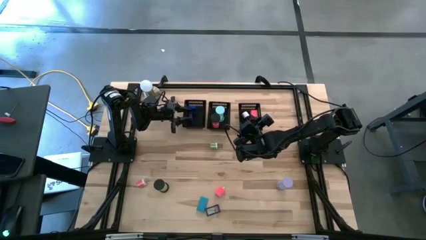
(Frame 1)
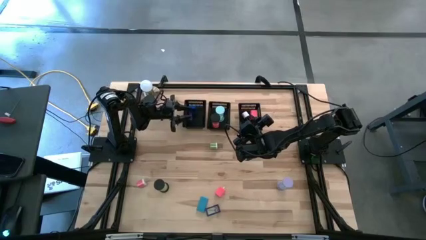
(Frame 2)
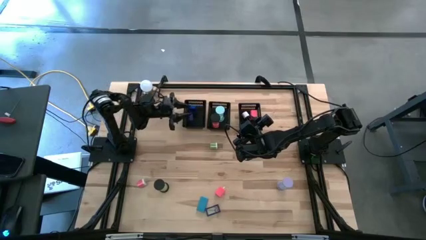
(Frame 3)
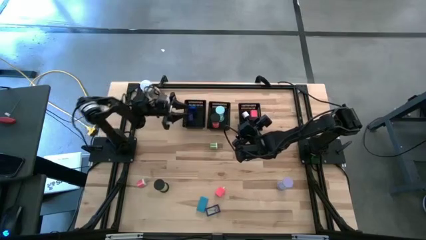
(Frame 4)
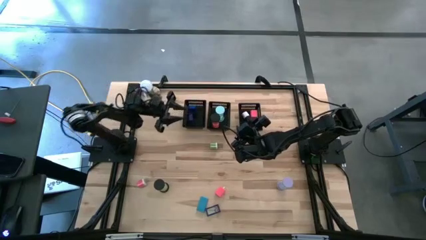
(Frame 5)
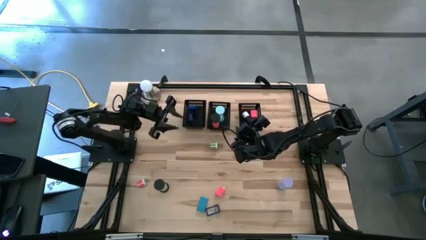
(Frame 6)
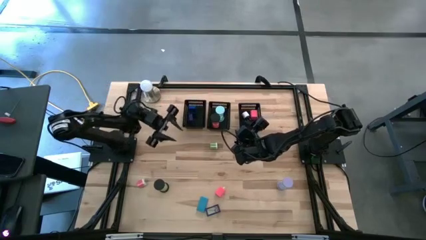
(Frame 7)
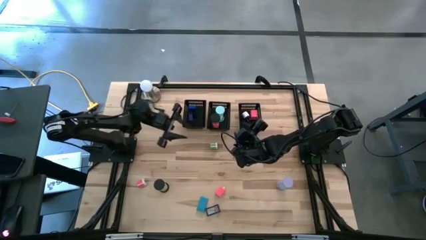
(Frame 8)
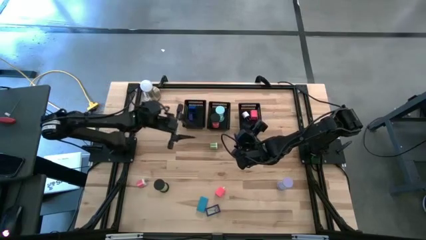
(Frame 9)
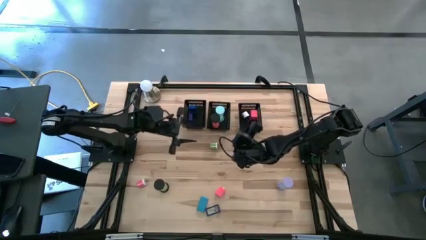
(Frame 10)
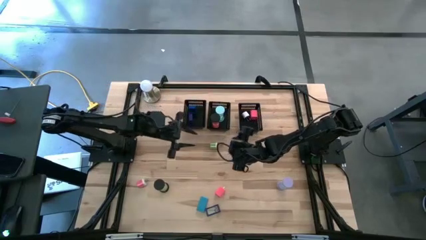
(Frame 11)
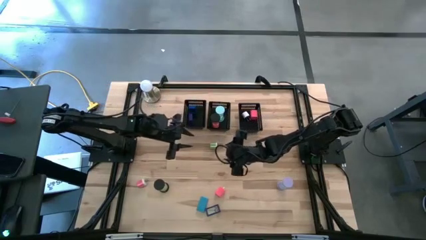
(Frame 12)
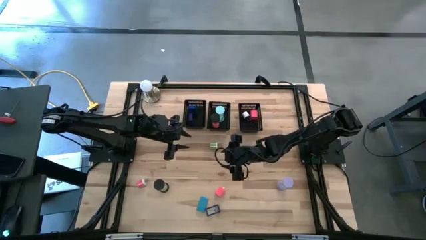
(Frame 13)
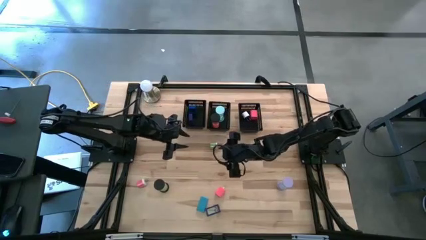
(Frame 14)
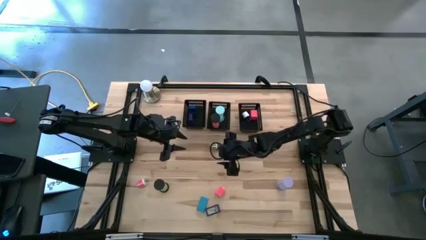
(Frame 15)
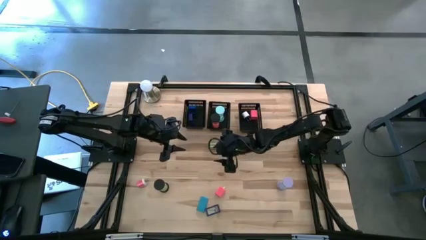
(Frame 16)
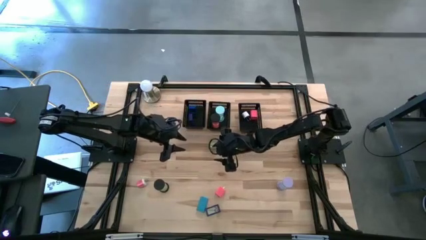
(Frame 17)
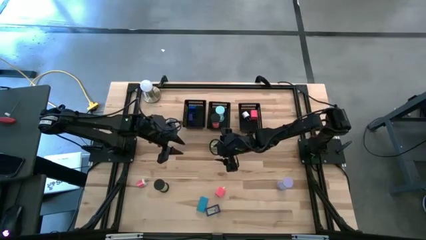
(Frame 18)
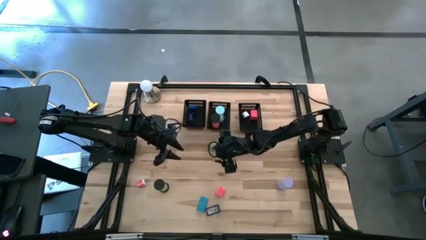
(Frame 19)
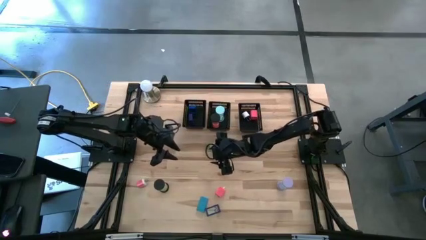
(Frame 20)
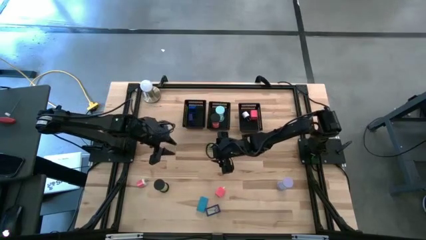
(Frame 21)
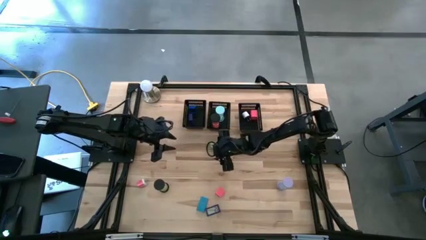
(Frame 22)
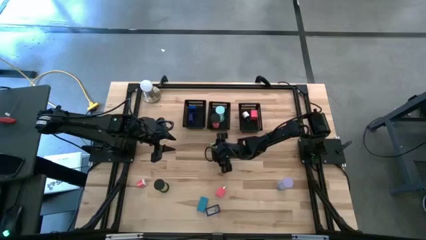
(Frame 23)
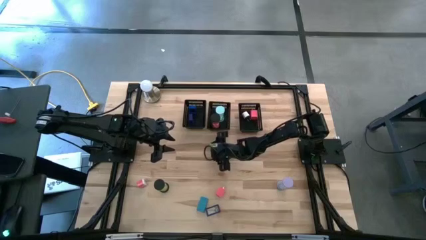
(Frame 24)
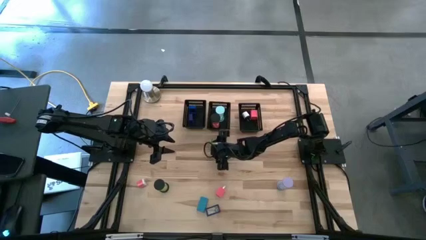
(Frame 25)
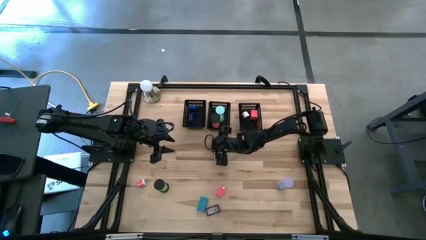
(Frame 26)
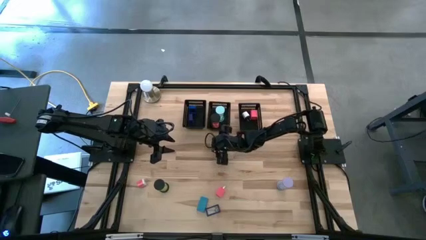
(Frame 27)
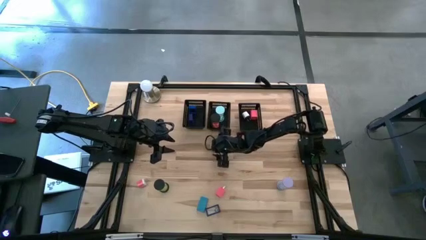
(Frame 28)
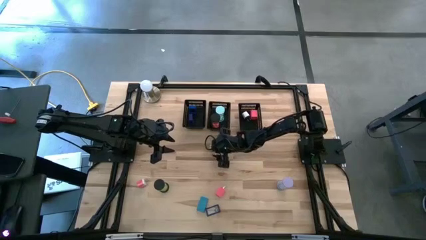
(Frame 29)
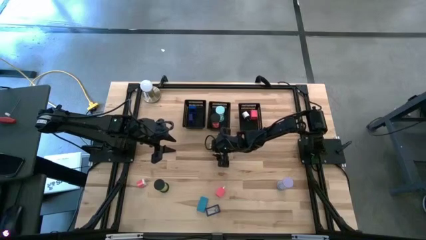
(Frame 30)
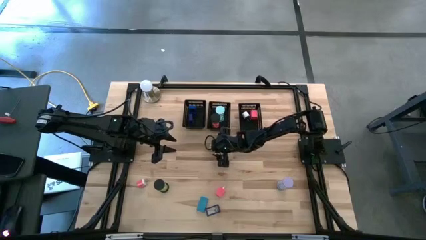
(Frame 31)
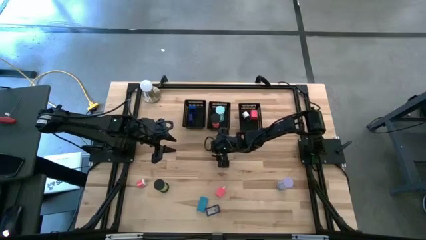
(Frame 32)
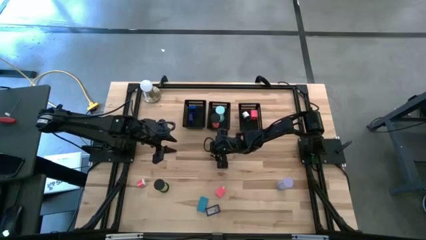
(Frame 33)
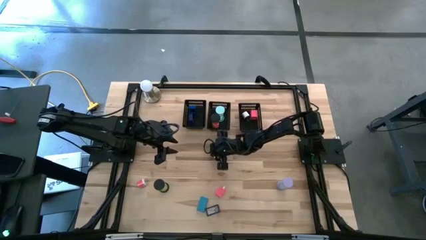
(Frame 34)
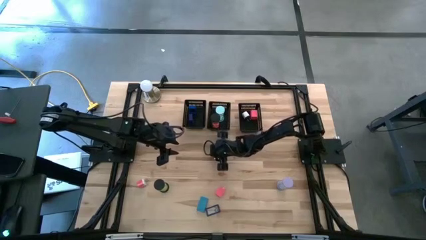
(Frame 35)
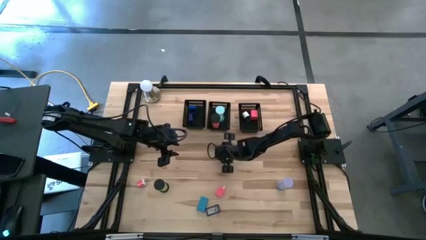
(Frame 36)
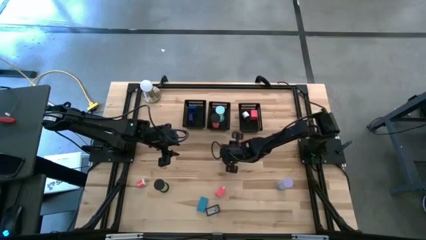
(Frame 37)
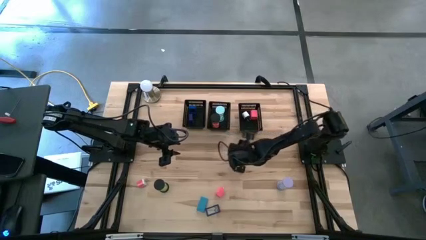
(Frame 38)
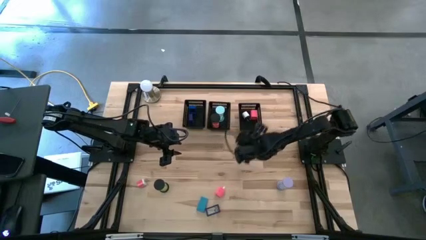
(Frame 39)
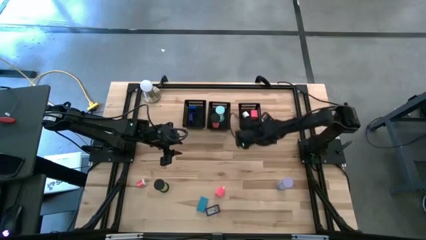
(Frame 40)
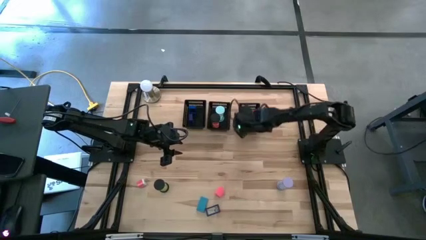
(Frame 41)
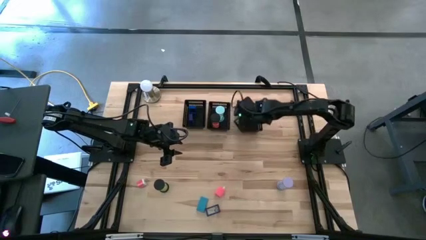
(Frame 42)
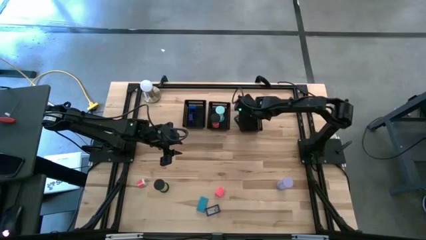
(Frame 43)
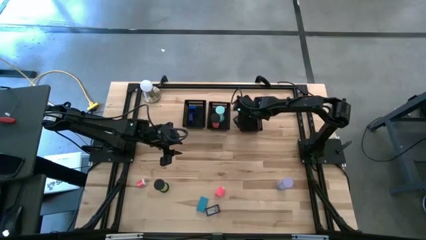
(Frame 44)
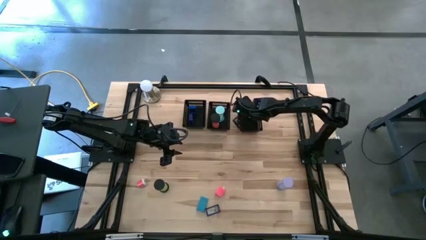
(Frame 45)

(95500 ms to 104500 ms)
Task: Pick & Place Office items
Put the green charger adapter into the right black bin

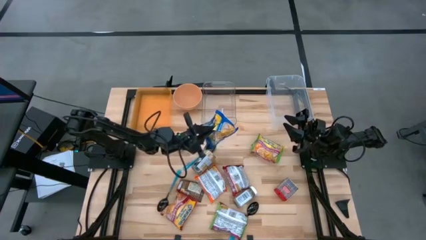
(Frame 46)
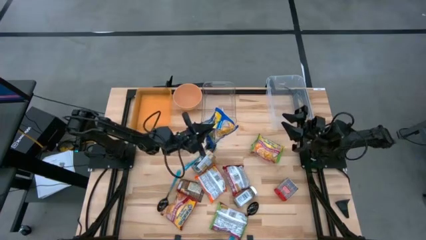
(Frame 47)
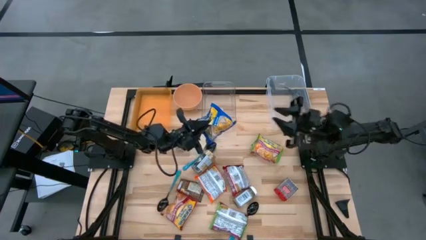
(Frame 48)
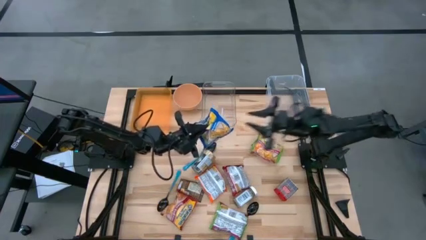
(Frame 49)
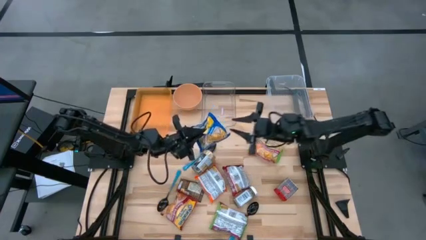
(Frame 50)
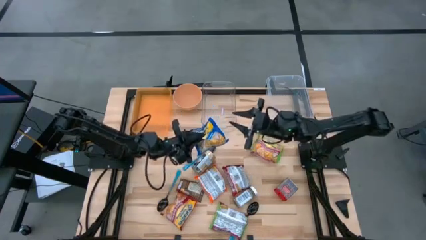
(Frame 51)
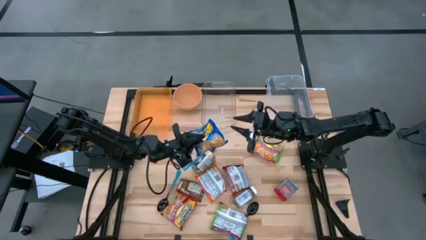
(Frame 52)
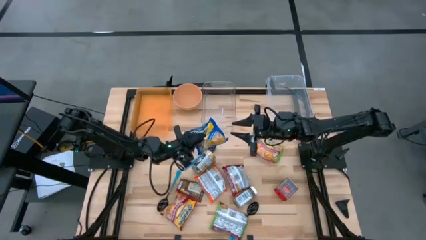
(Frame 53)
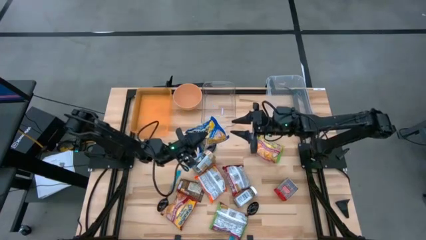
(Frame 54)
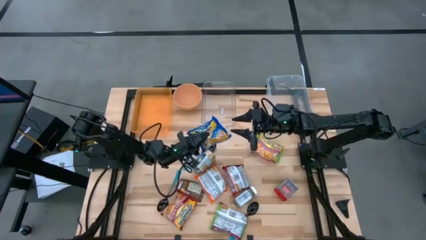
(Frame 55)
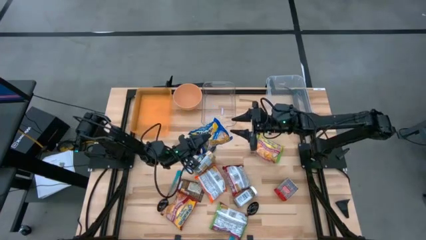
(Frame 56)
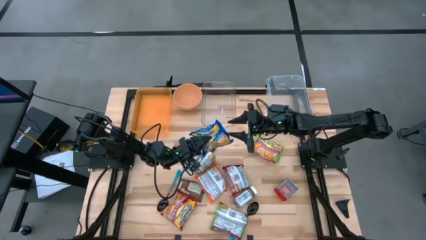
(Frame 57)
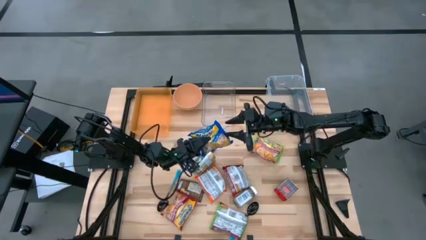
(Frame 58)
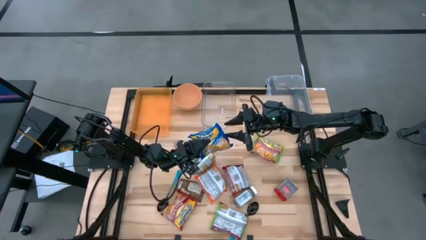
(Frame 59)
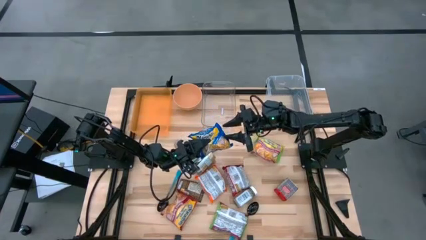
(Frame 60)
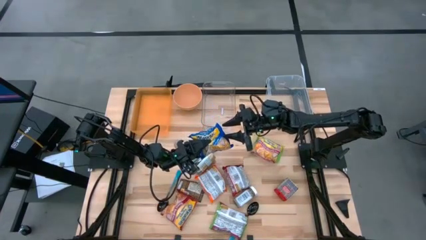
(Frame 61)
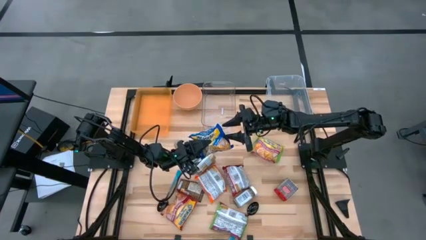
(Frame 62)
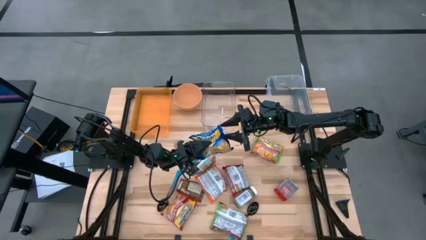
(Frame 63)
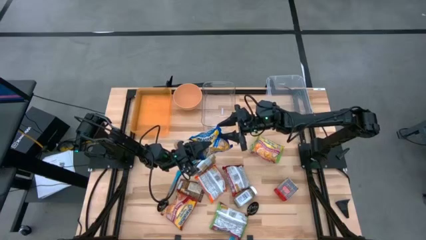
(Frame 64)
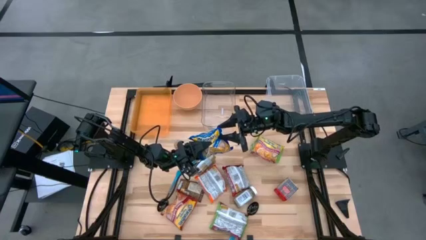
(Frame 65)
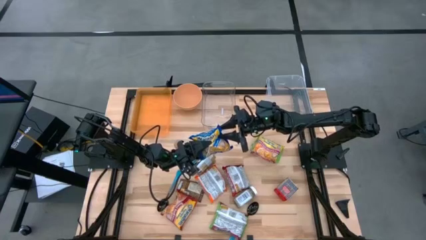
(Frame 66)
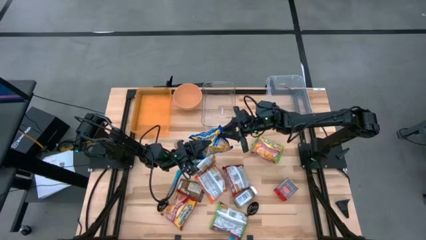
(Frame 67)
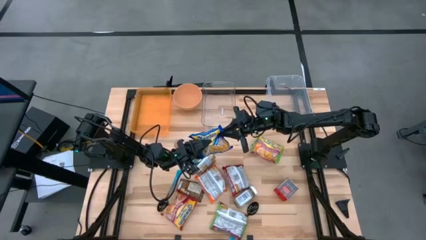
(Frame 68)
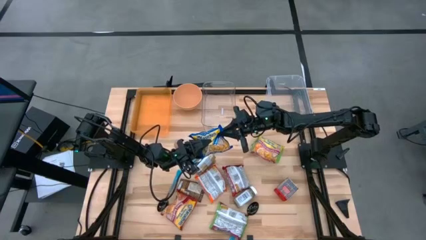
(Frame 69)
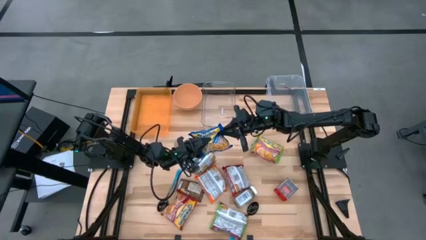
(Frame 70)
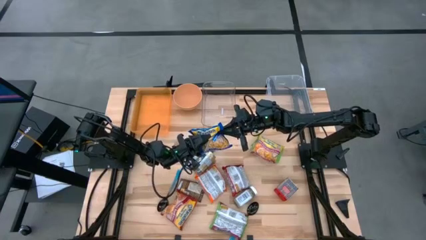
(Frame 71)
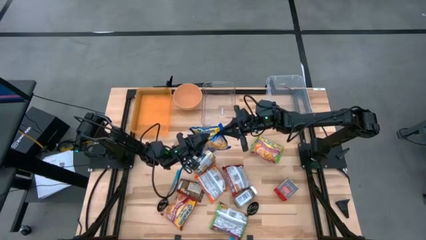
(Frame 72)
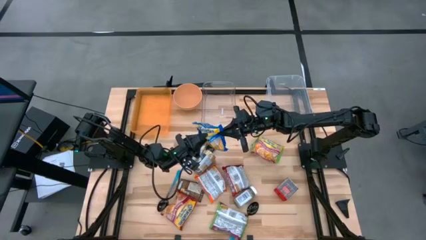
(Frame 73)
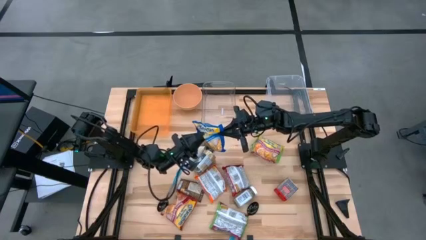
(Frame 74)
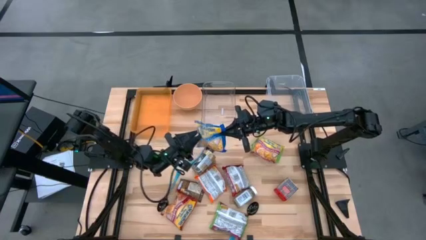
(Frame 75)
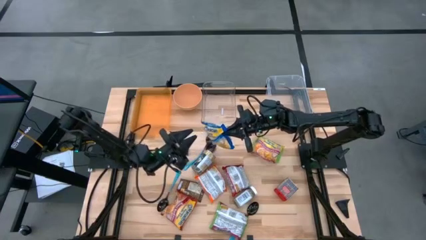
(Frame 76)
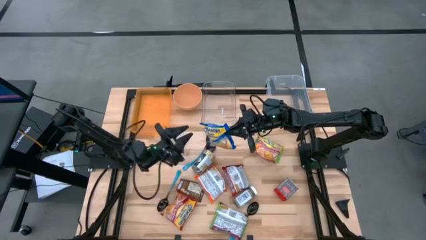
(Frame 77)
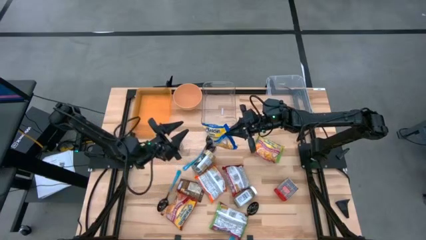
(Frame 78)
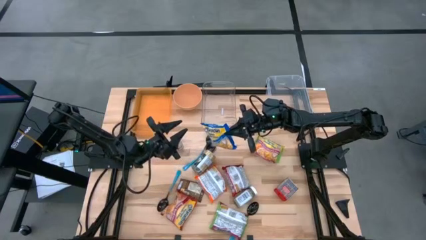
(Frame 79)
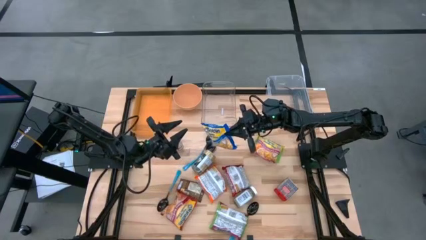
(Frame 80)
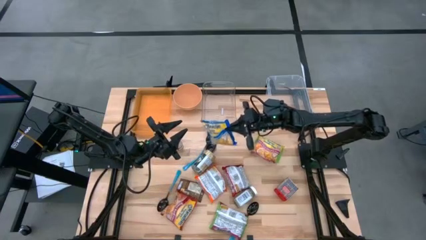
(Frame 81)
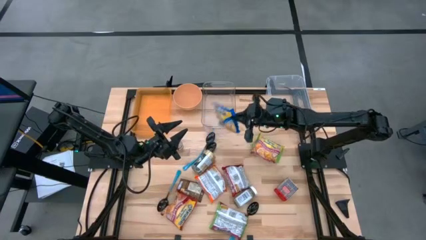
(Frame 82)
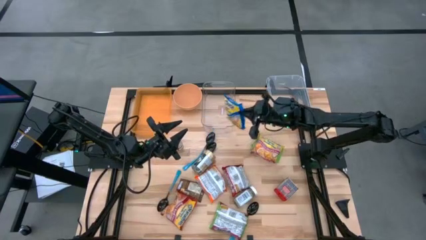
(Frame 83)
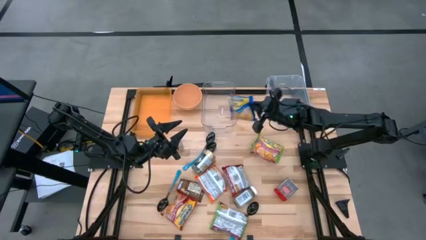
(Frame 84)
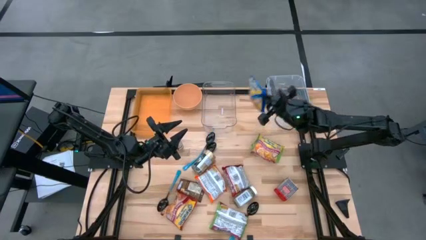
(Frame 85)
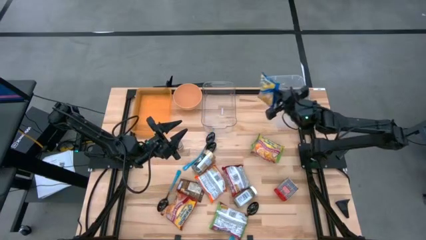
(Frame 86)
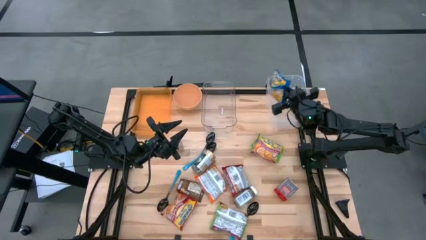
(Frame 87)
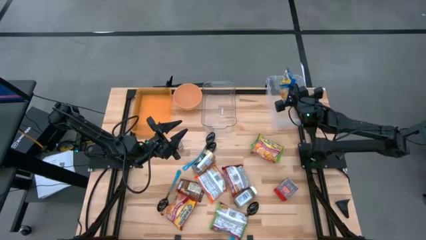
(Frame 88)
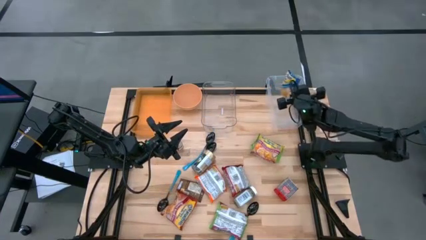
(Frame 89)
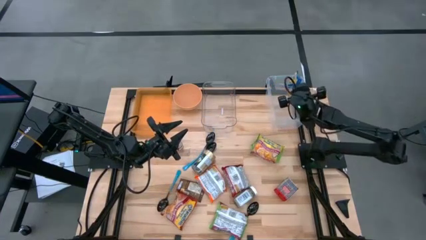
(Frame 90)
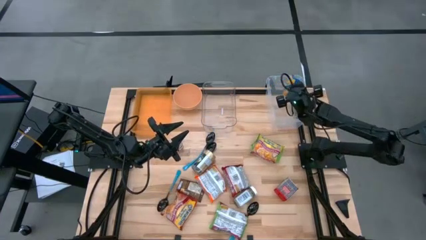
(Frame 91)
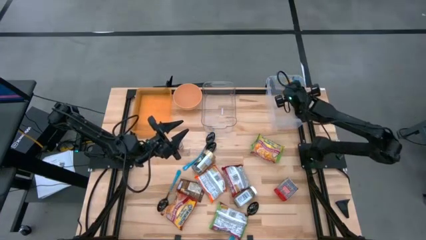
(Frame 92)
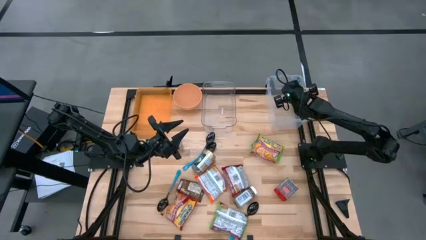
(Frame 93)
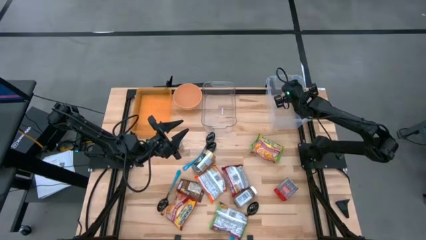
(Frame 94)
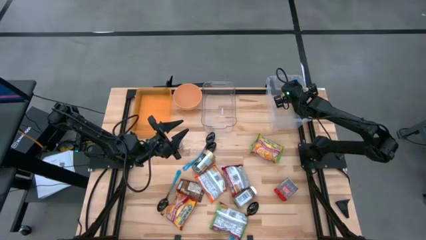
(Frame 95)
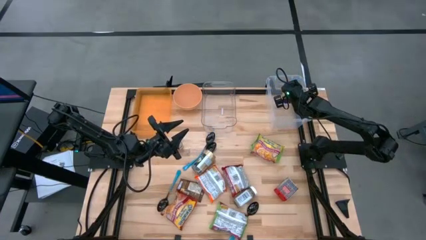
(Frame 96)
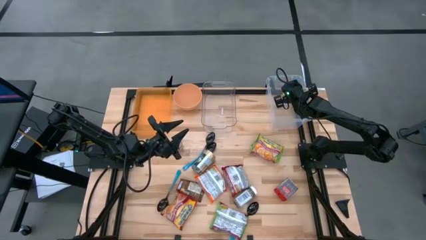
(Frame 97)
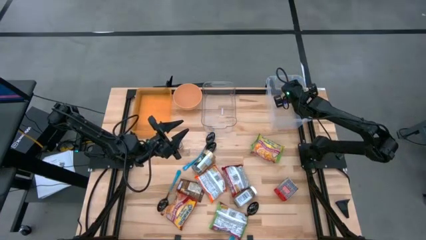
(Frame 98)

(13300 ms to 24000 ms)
Task: Pick & Place Food Item
Put the blue noodle pack into the transparent container
